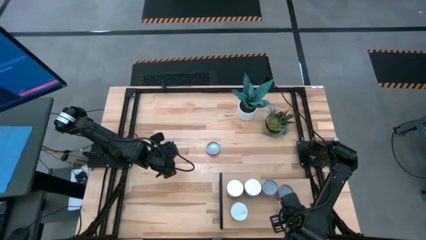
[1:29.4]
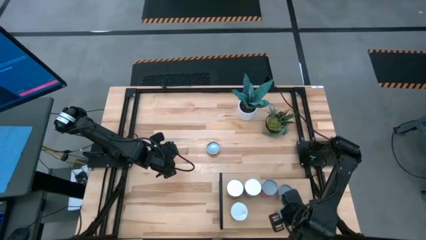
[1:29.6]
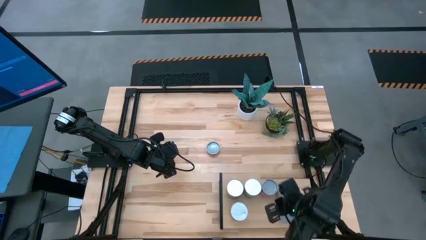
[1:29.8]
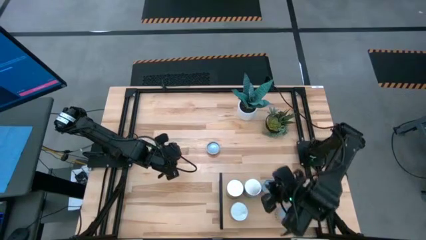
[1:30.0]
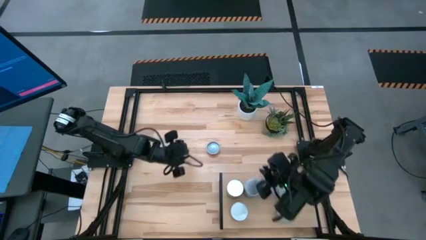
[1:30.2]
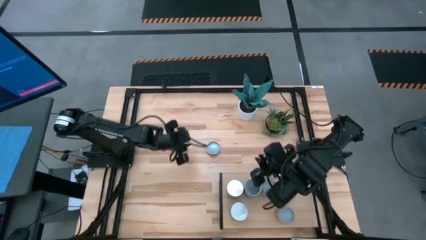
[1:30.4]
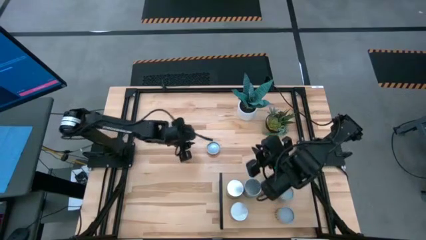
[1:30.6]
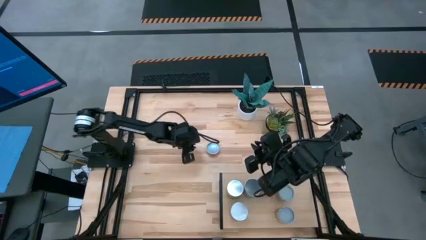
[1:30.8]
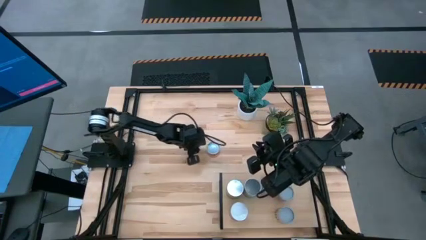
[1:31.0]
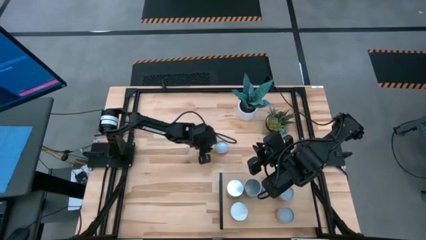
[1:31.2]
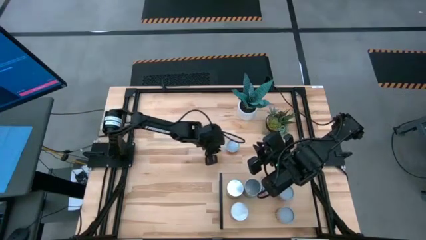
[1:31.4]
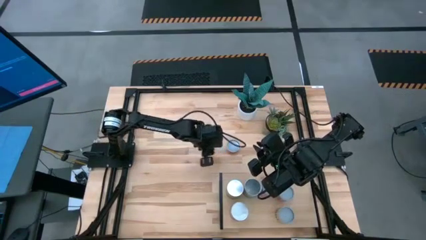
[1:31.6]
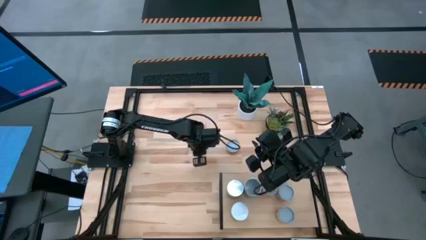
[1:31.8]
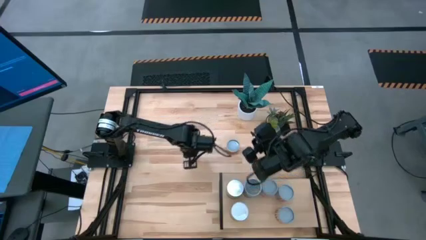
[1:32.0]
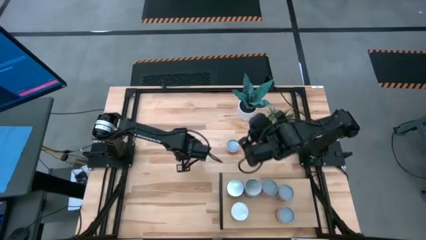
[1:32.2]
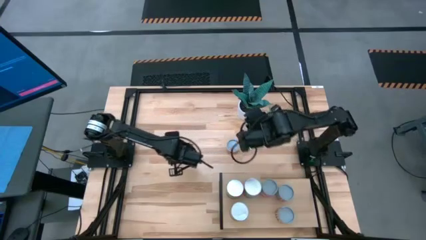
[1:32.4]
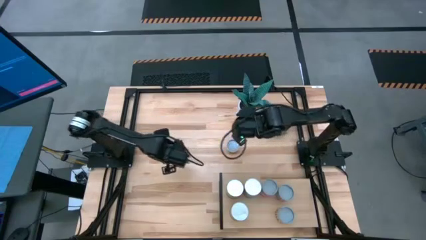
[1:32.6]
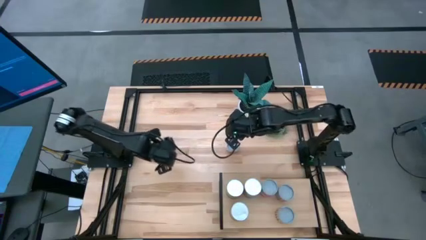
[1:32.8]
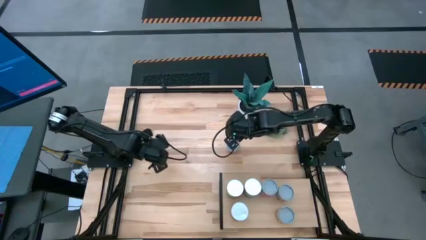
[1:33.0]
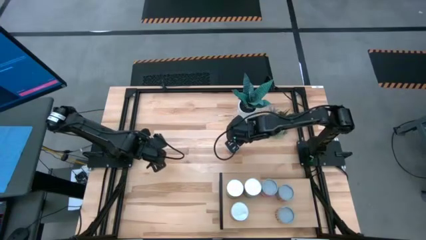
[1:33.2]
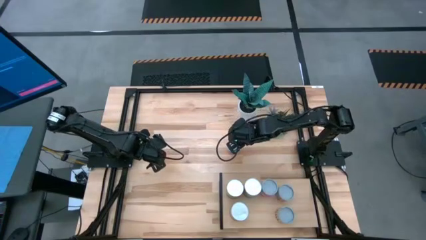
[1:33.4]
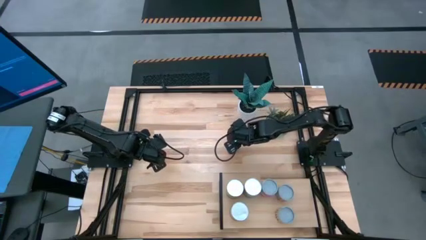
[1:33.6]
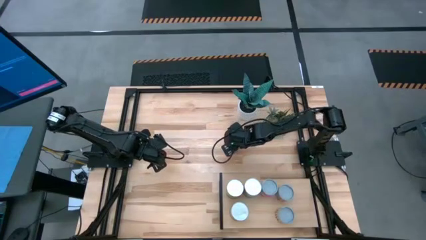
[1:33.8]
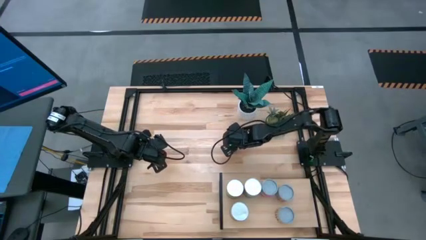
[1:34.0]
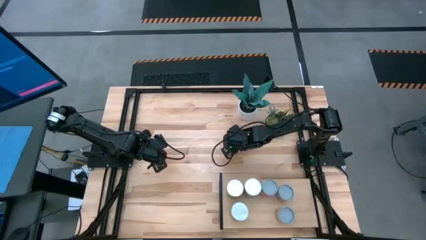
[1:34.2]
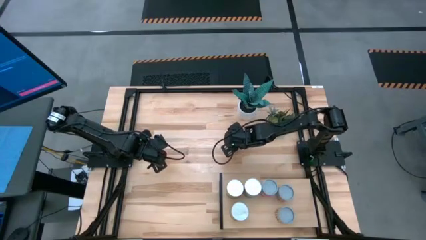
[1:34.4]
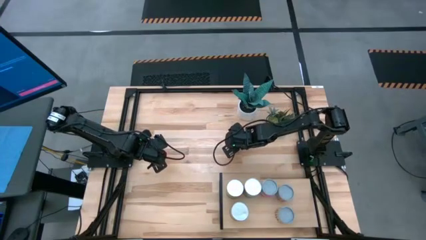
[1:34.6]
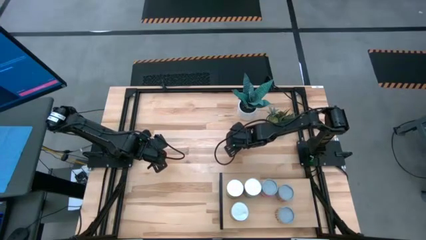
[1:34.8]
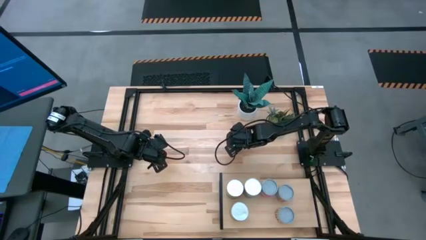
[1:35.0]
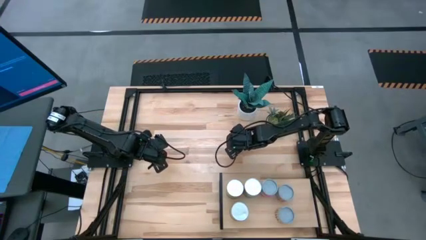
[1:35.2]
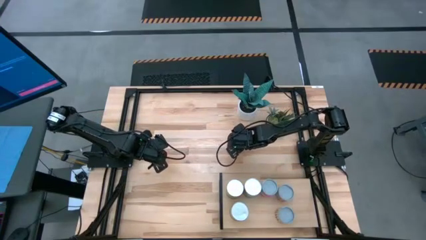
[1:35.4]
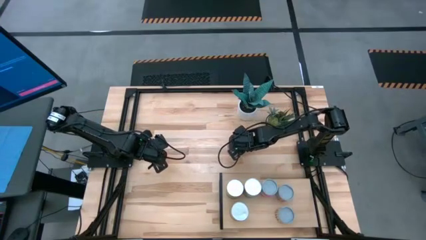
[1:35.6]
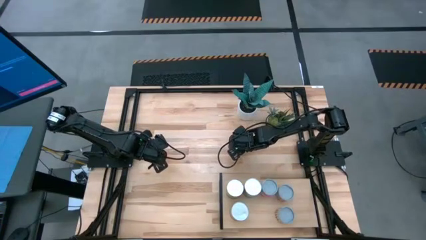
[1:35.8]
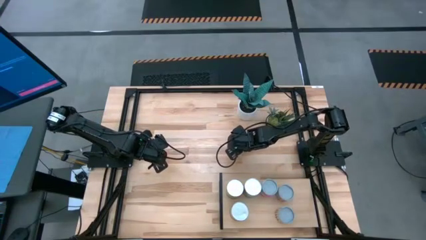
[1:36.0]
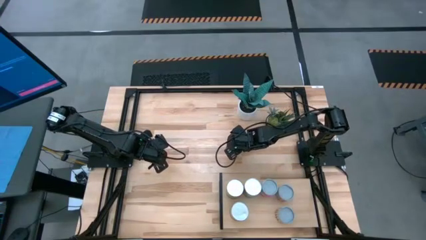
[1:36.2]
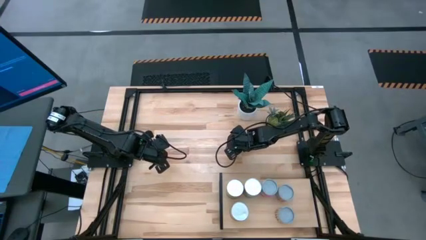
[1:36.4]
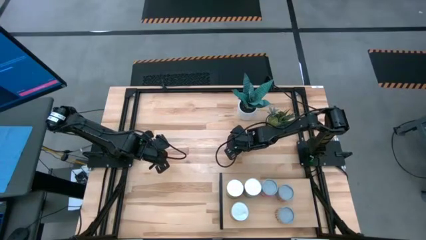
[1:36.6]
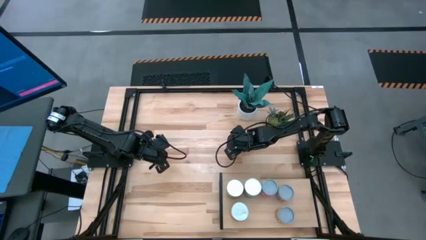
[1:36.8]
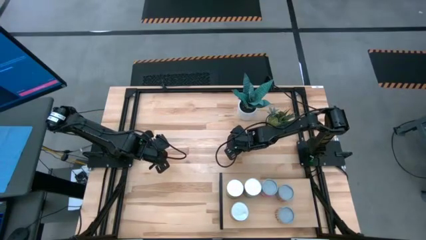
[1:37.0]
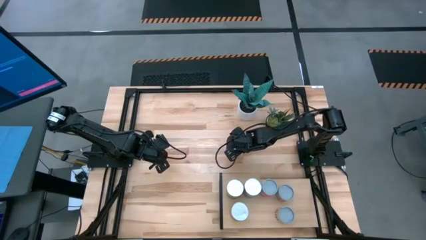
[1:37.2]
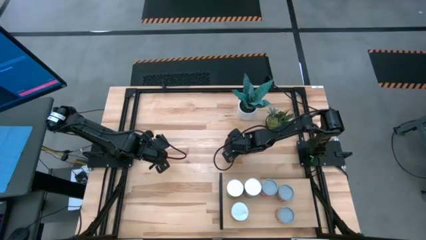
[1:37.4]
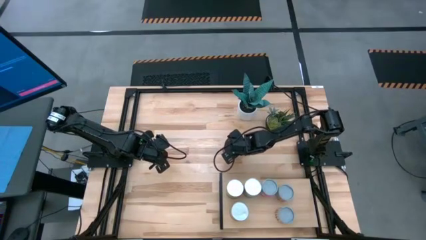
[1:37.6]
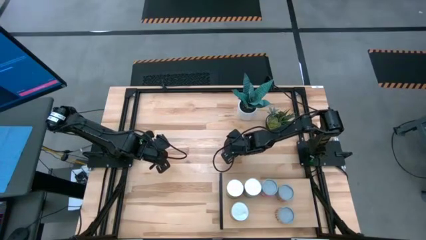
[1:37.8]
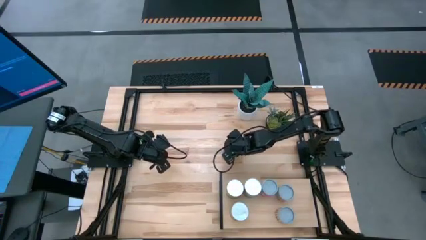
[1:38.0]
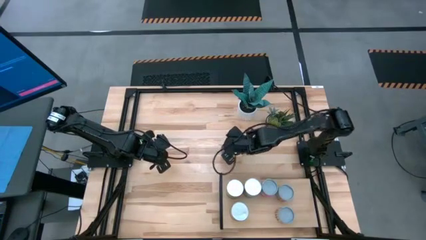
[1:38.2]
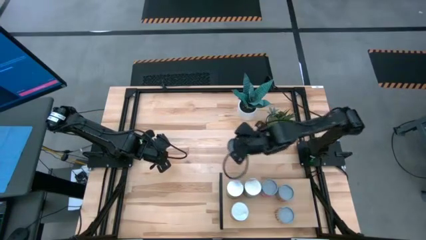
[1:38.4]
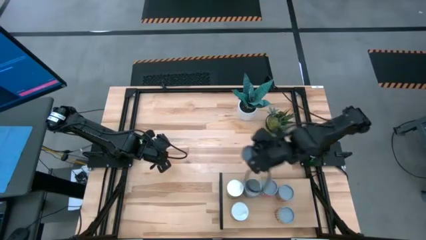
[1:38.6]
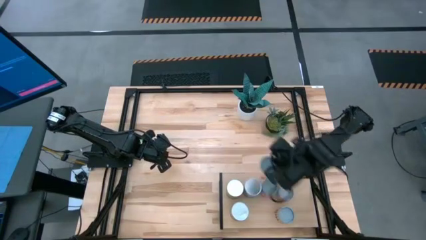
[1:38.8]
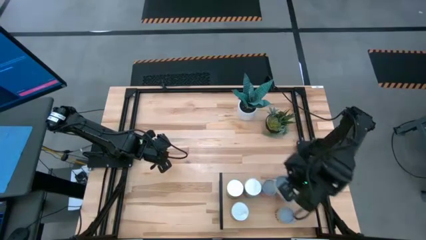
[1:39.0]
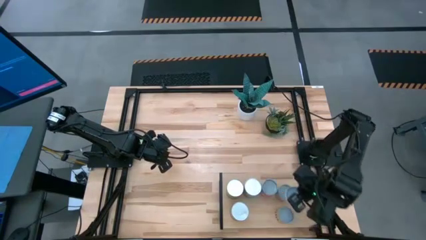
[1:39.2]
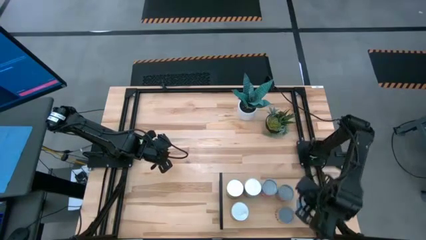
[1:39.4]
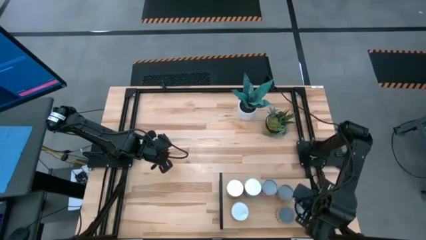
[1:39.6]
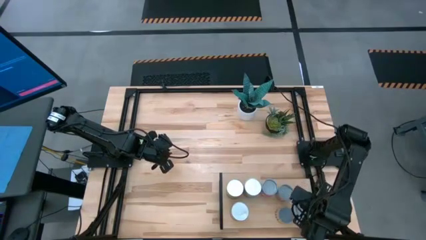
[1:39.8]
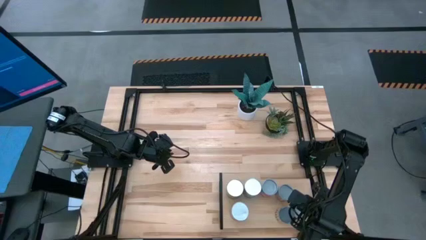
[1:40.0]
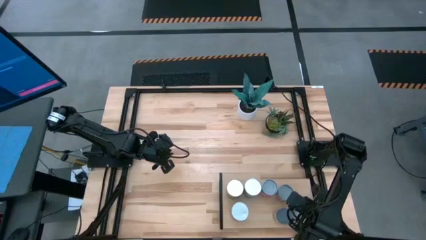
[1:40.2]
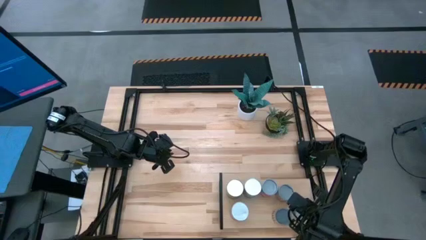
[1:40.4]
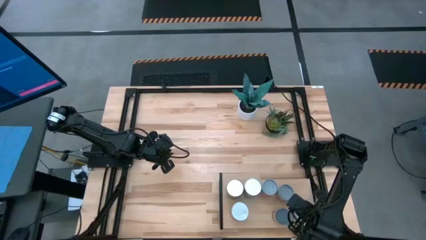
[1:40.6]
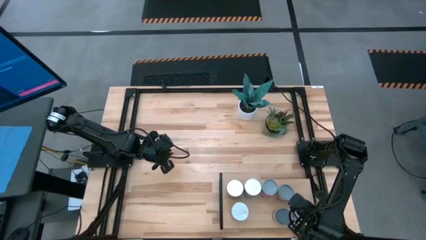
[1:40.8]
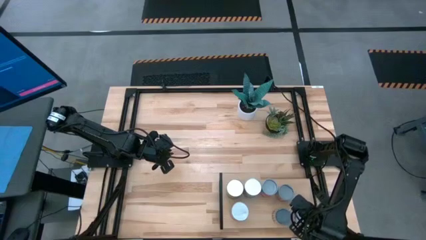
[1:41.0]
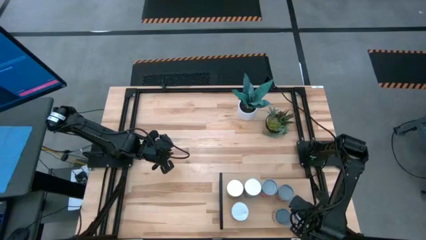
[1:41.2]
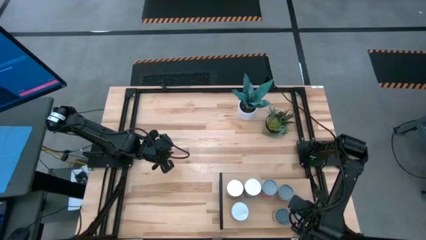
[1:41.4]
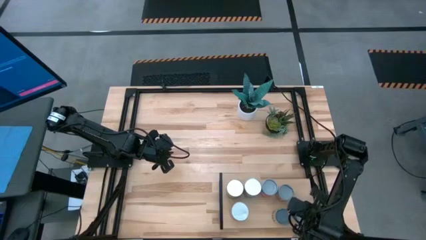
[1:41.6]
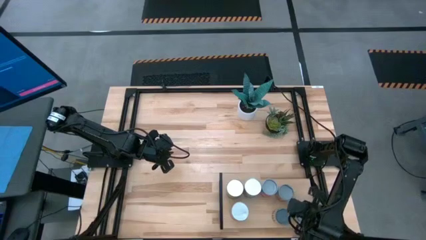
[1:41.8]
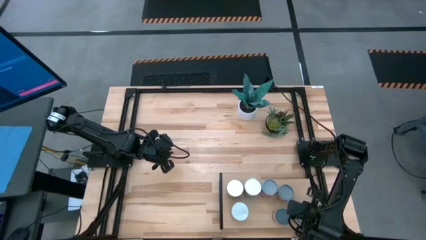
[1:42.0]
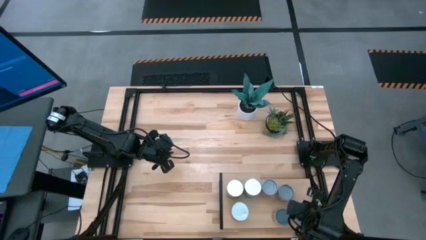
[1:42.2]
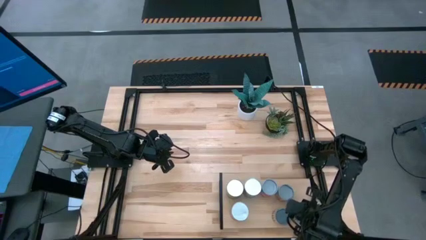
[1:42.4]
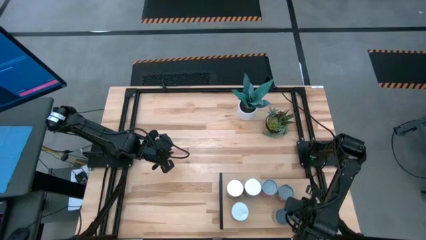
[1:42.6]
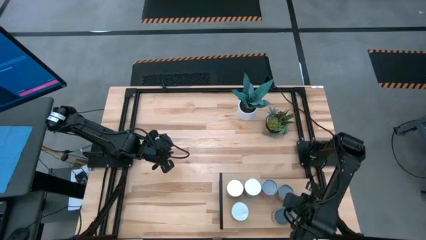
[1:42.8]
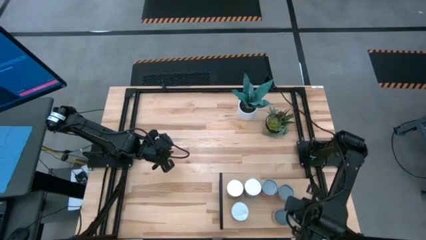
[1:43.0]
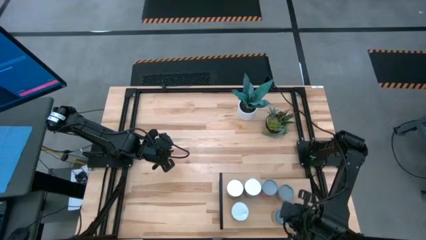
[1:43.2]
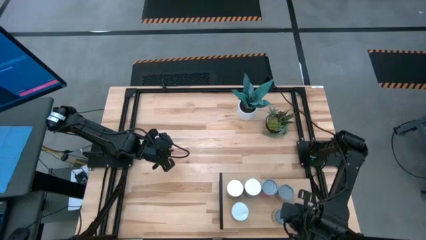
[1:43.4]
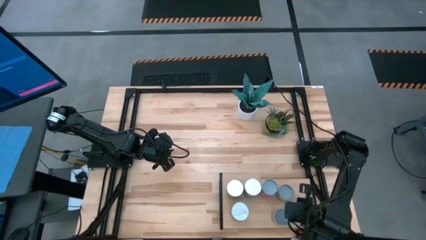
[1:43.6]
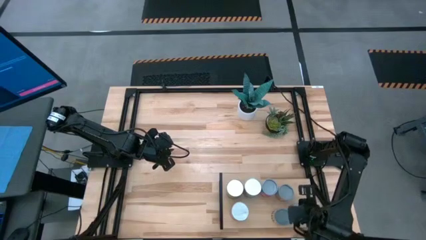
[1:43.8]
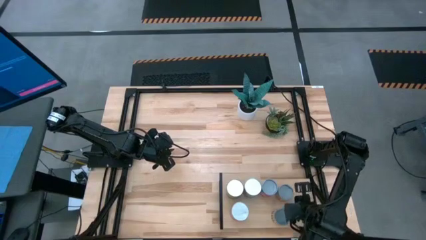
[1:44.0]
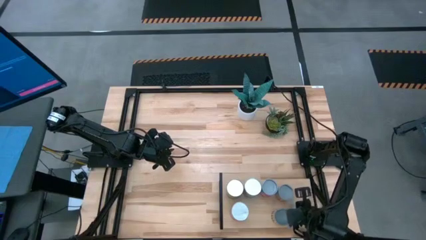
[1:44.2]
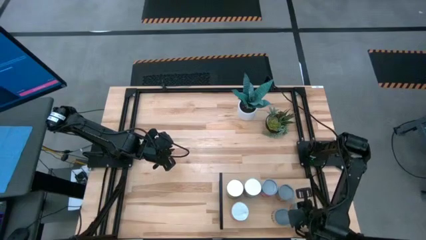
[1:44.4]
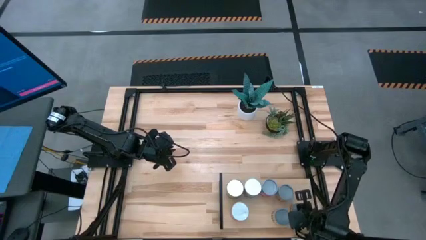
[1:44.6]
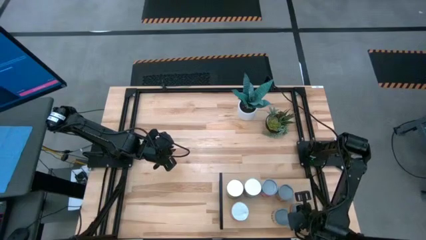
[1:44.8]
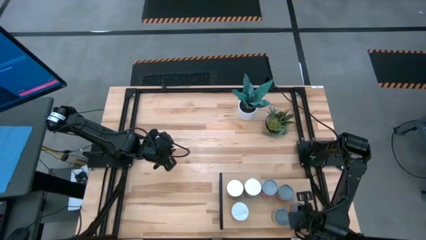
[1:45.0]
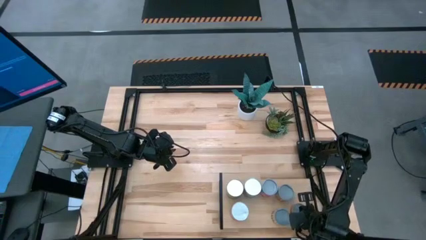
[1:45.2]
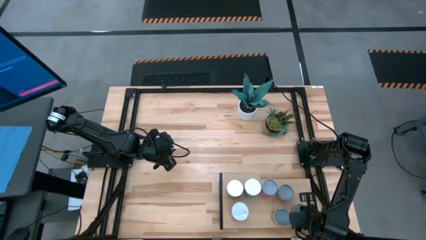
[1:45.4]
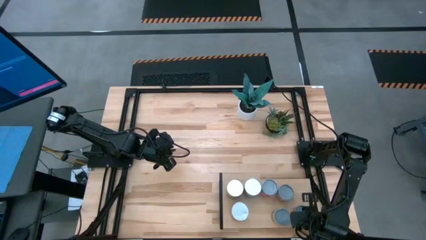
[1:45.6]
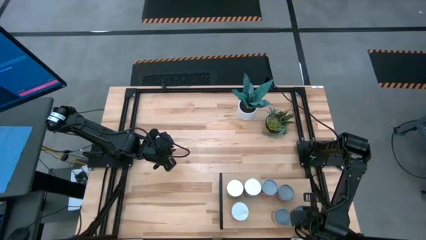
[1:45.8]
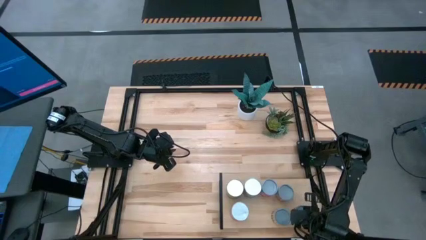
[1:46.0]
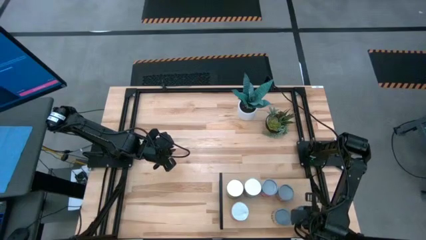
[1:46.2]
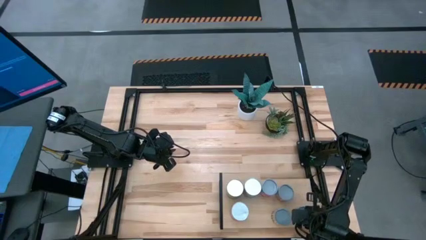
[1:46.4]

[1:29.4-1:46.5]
Task: Pick and place cans onto a shelf
Put the canned pineapple rings on the shelf
